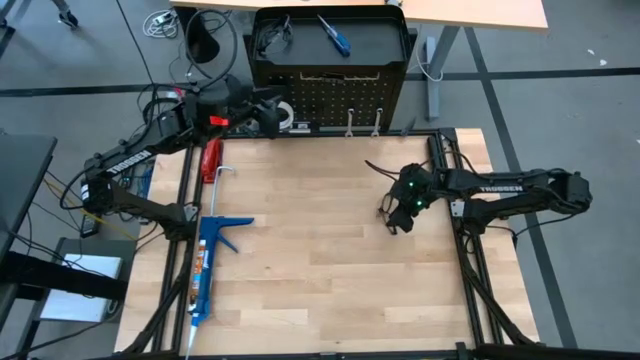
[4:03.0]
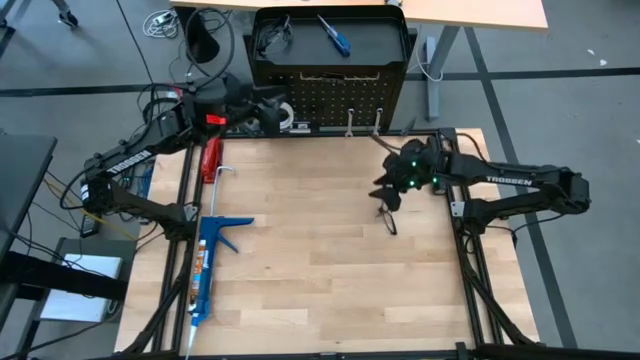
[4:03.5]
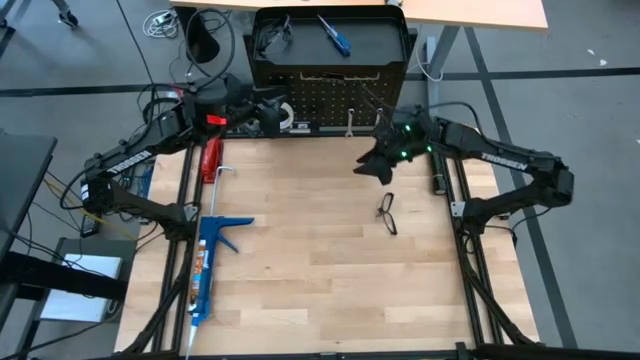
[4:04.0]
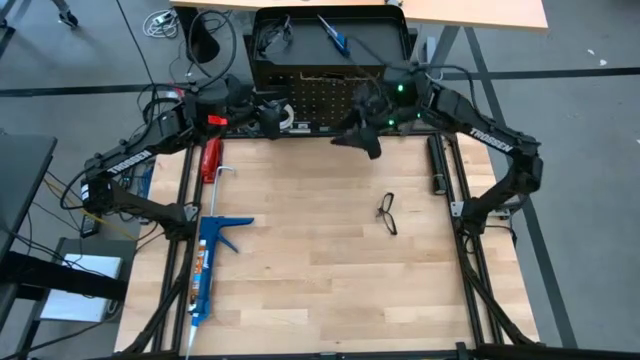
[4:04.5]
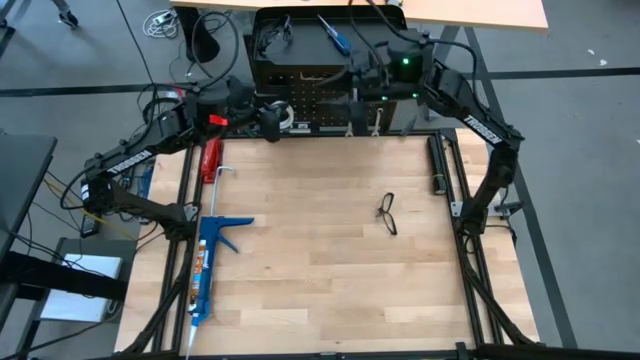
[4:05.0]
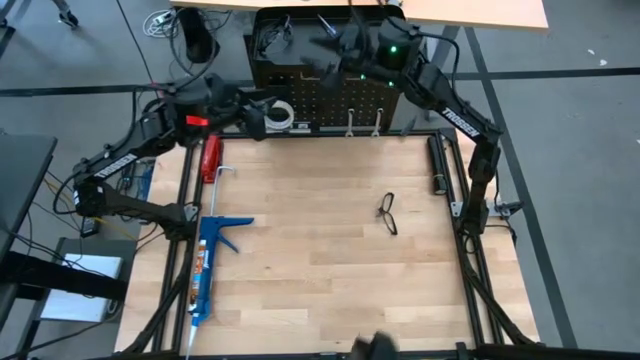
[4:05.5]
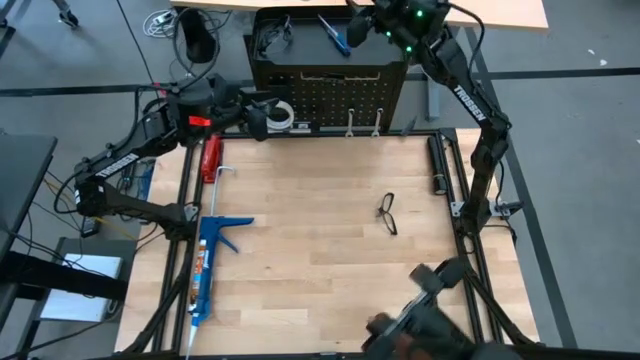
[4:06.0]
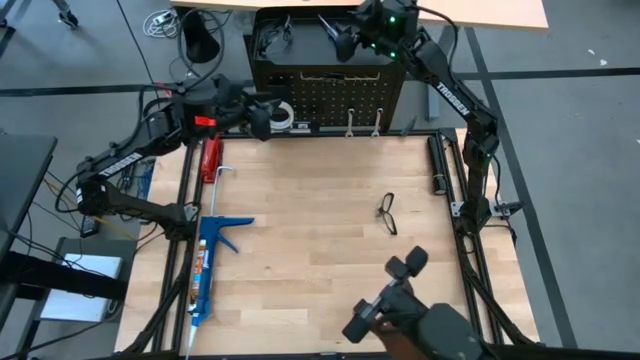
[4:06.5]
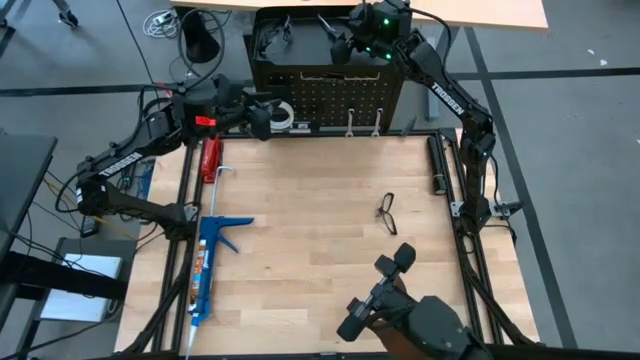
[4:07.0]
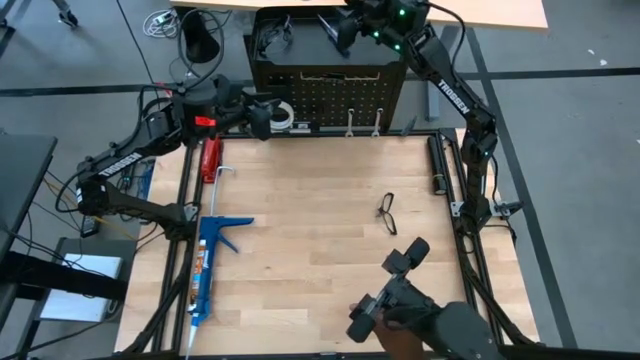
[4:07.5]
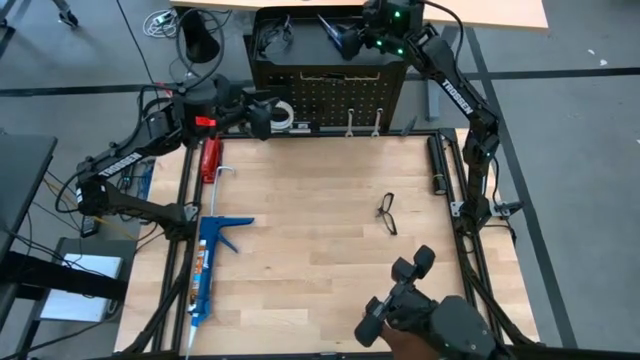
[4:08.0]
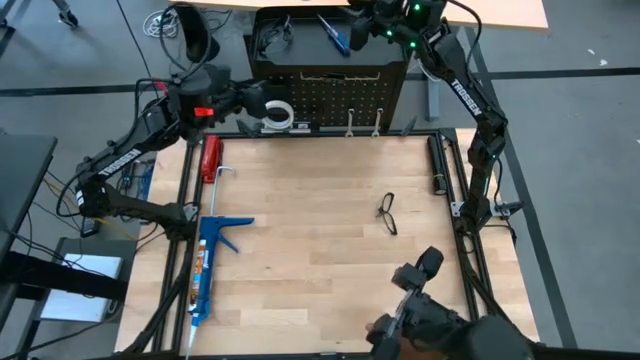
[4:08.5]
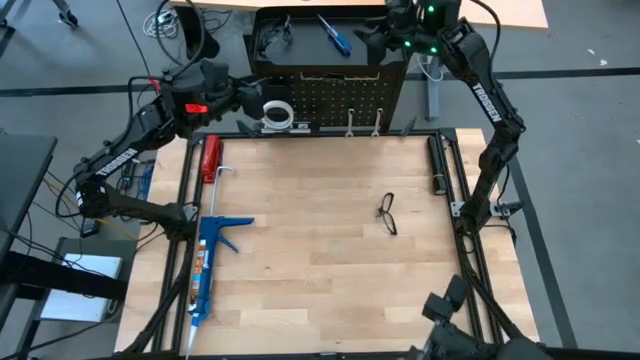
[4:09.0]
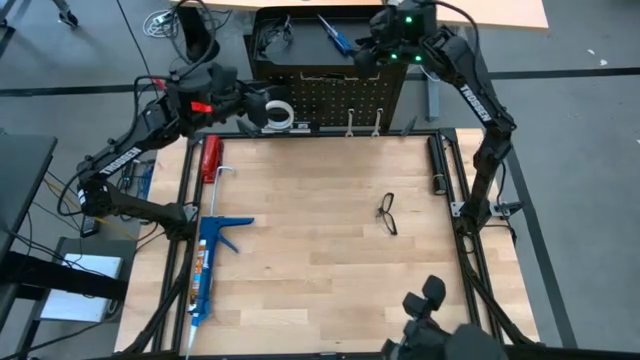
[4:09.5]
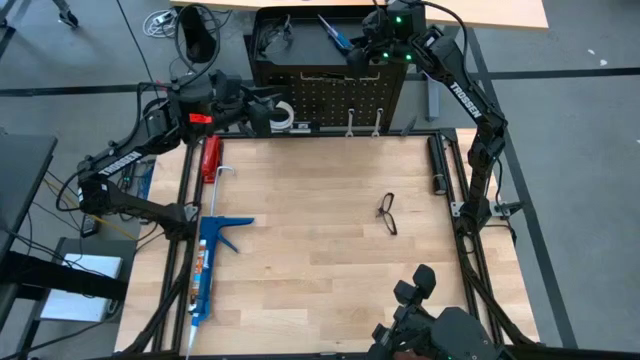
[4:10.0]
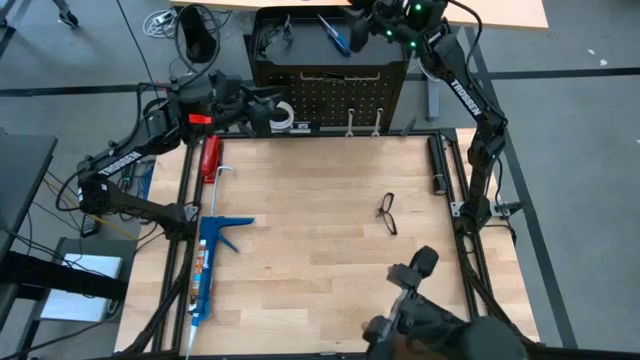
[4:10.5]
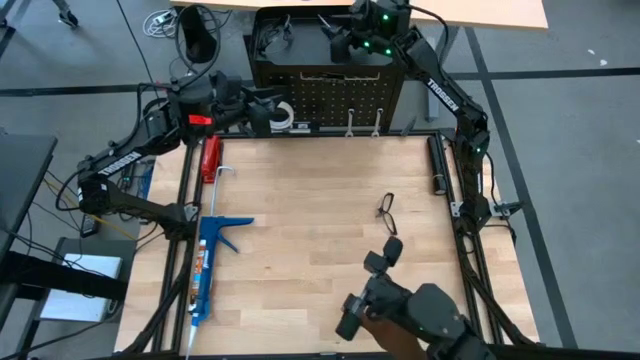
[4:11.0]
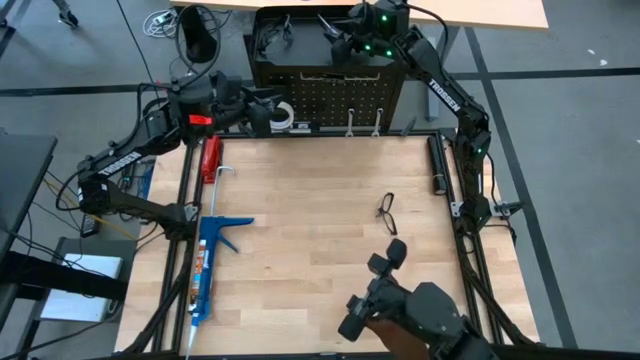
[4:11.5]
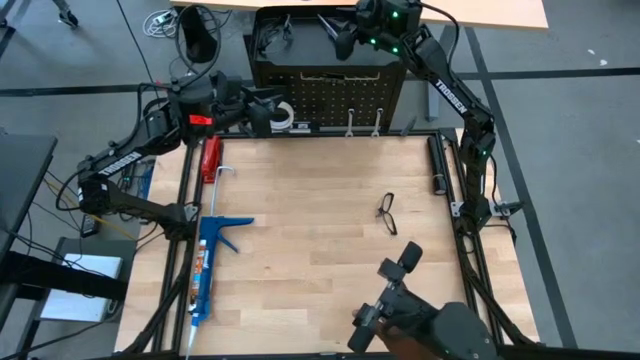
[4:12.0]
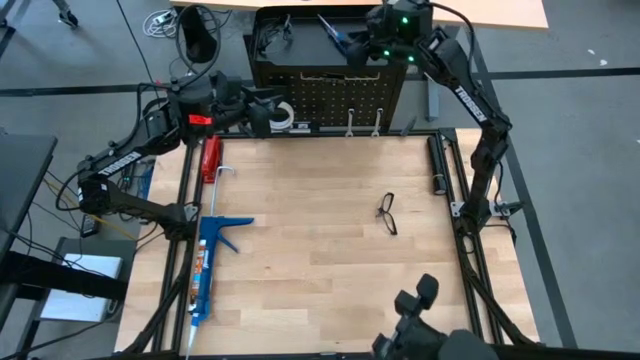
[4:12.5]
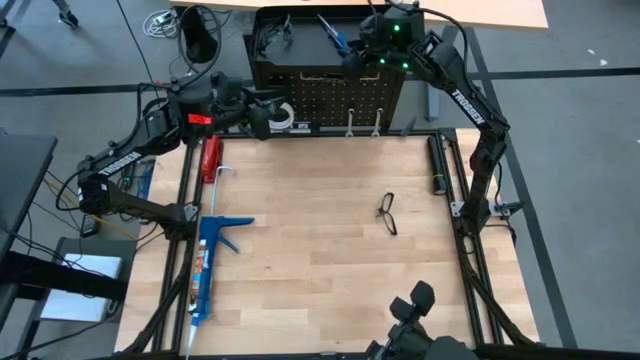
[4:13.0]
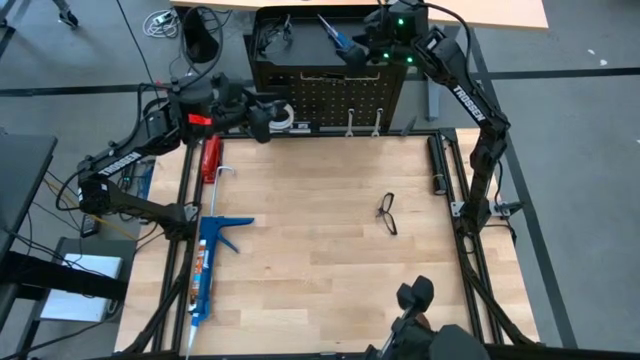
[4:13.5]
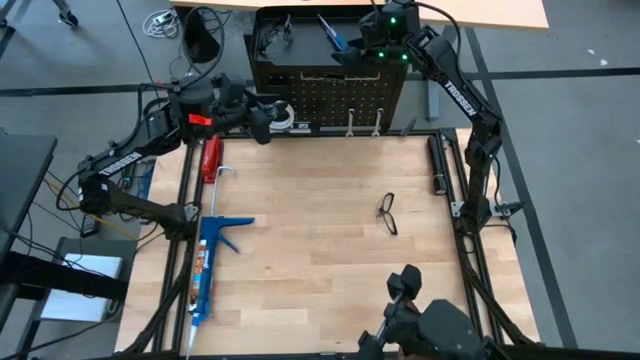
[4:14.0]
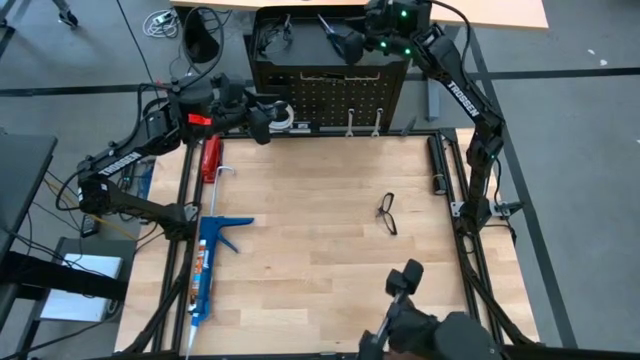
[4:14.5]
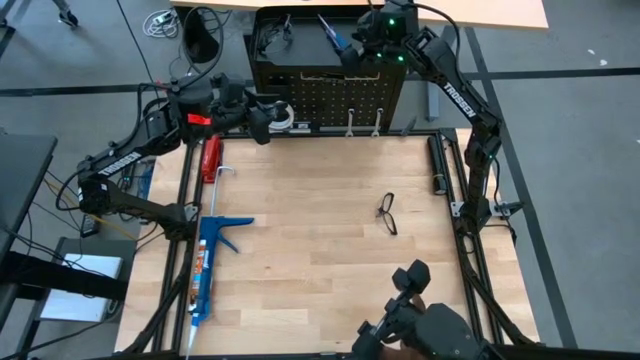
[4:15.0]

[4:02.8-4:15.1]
Task: Hang tools onto peg board
Remove the blue screwdriver from the black pegboard

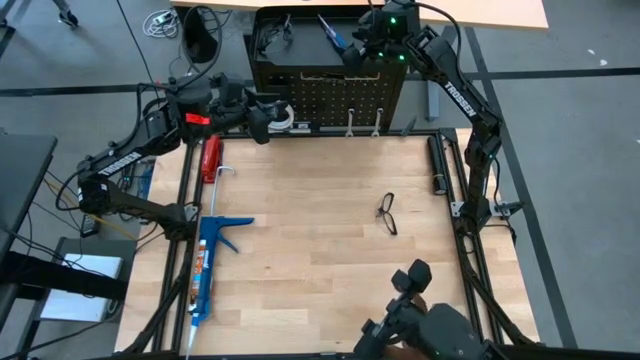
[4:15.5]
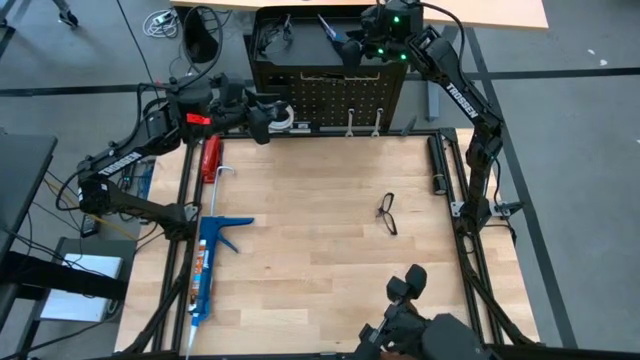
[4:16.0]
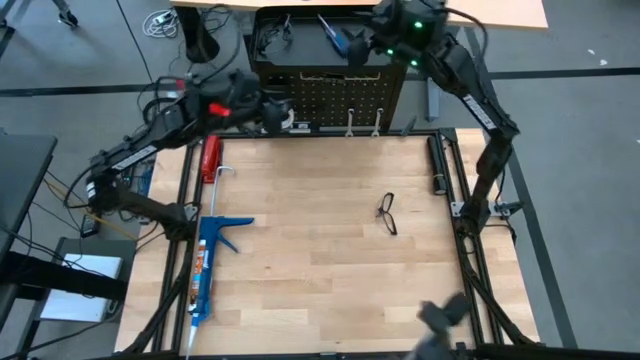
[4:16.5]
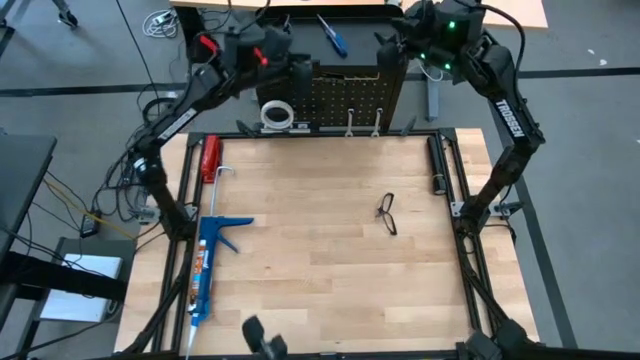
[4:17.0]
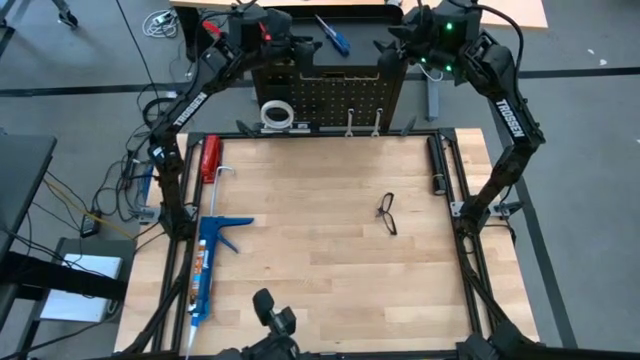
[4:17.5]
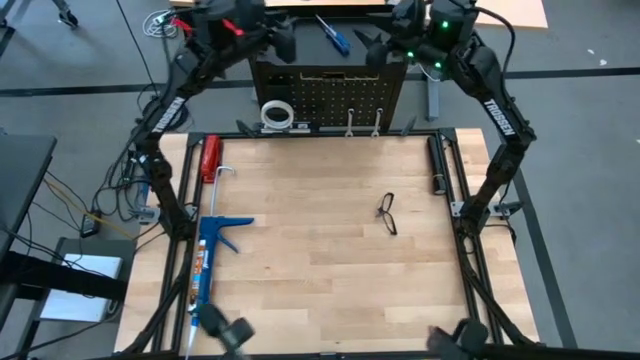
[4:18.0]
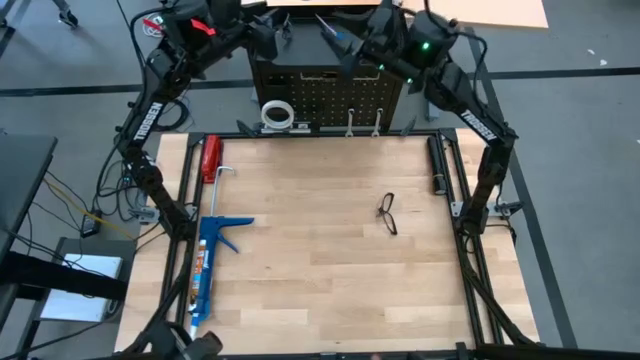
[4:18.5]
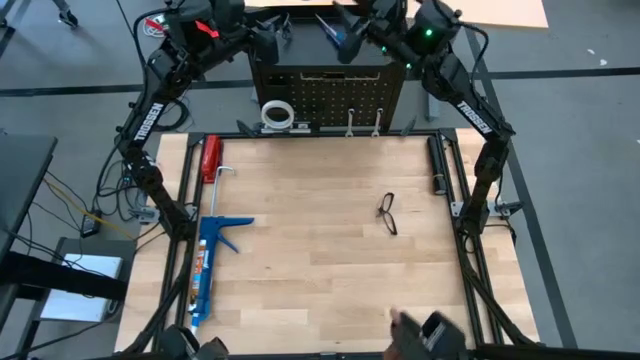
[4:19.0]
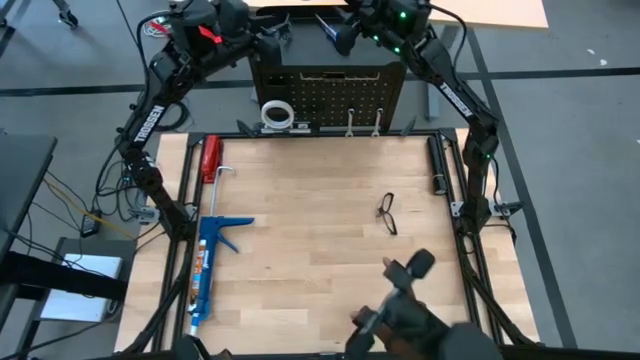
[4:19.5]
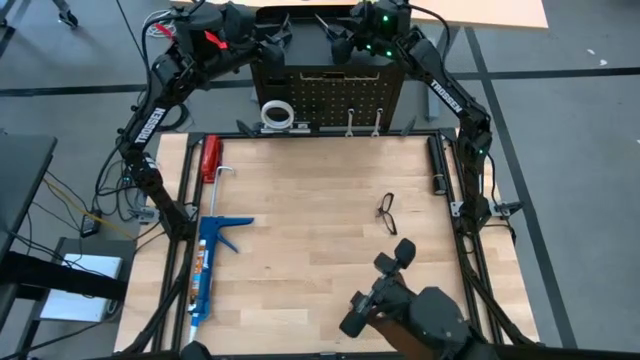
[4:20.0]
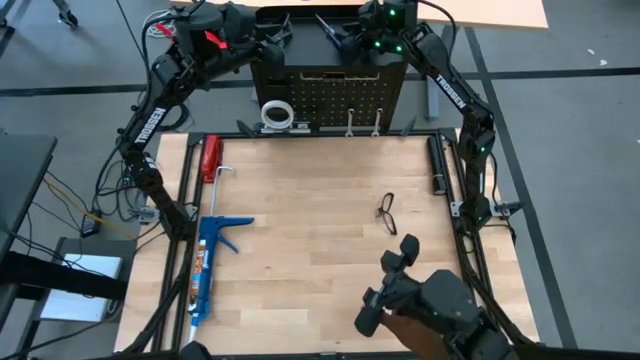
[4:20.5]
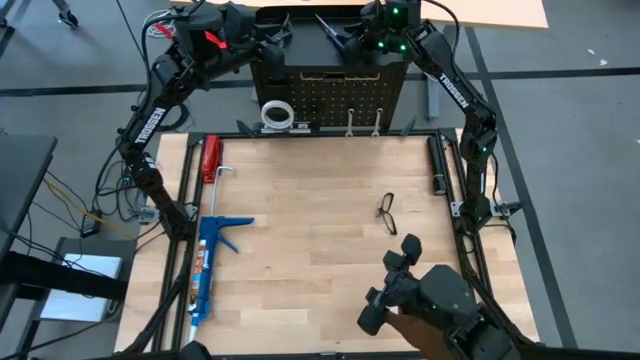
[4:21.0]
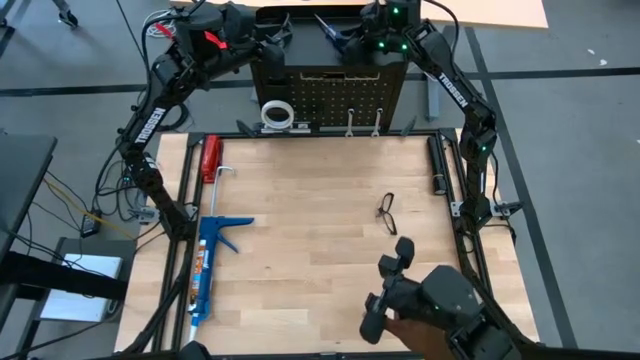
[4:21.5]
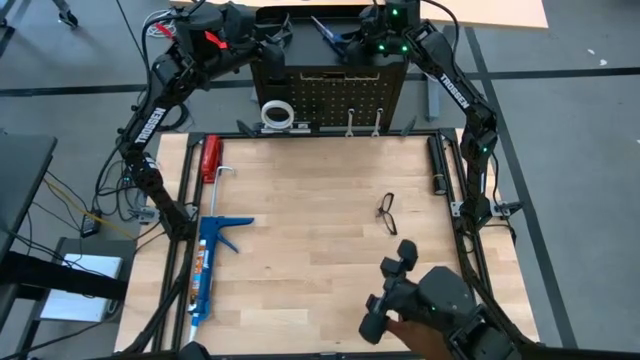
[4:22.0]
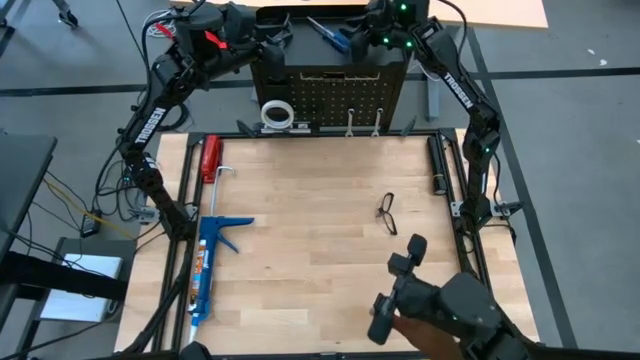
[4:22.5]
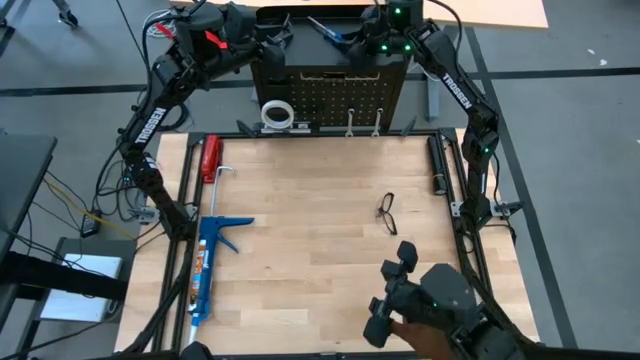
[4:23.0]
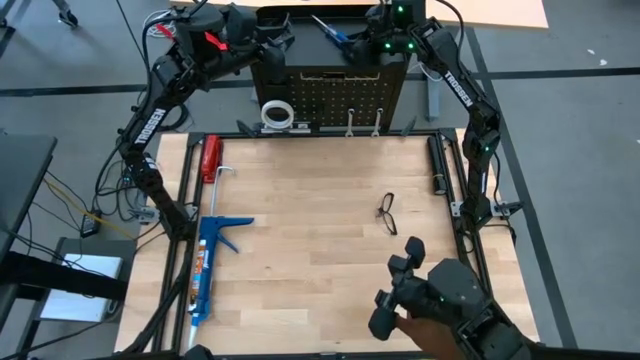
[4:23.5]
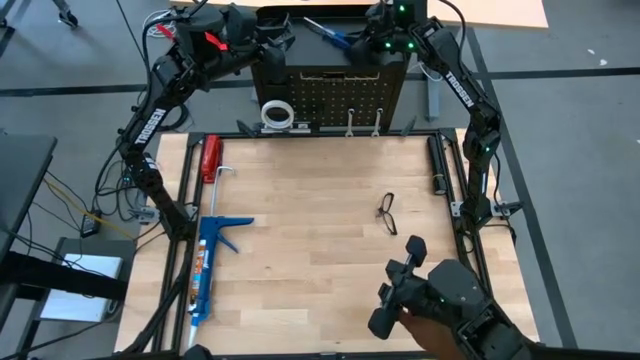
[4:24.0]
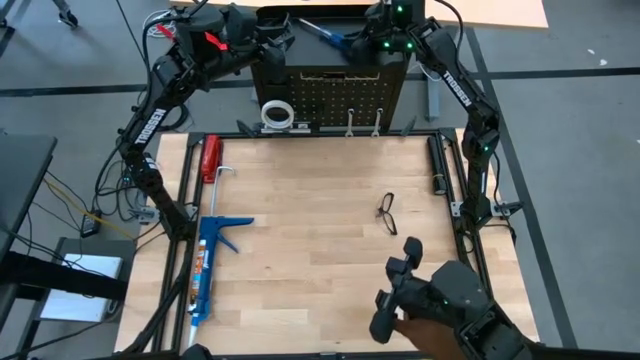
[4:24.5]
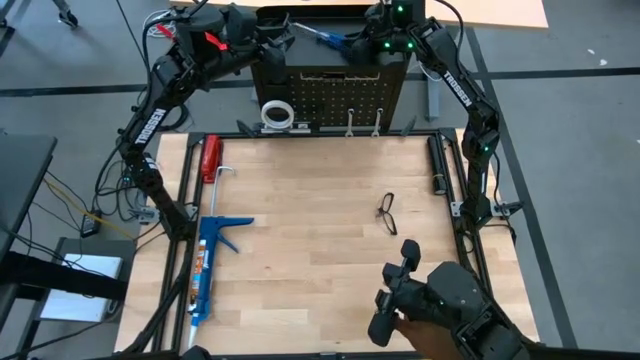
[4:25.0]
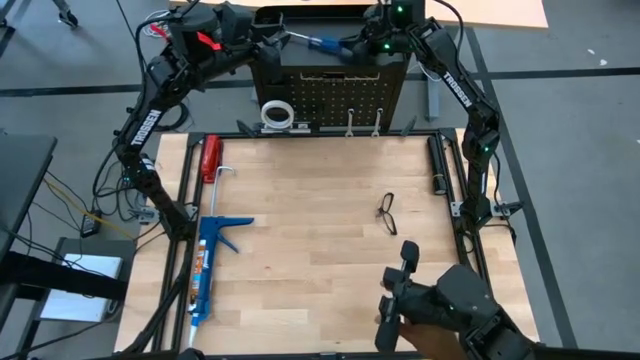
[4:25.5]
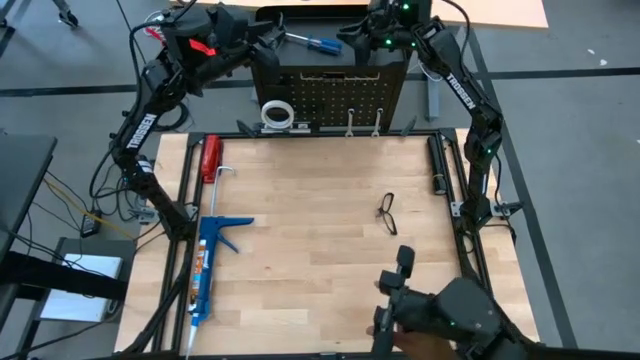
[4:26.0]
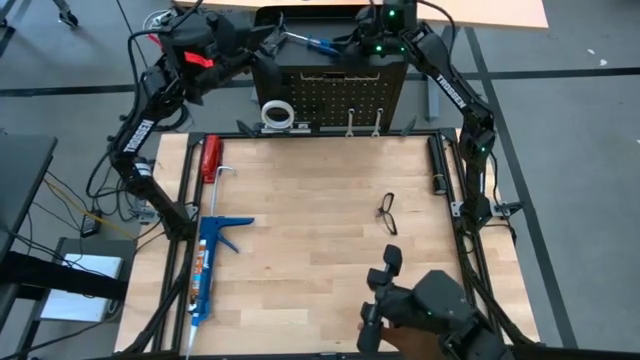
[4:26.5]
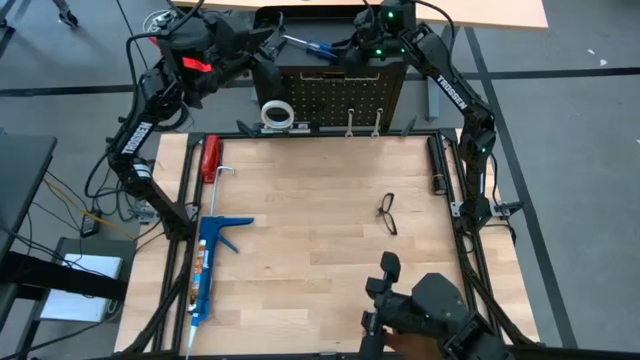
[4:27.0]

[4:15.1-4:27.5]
Remove the blue screwdriver from the black pegboard
